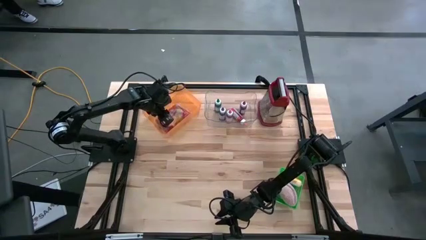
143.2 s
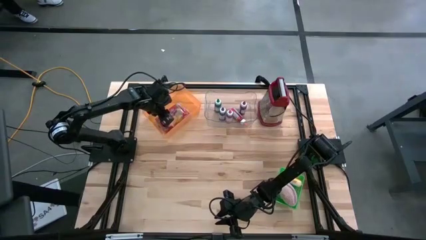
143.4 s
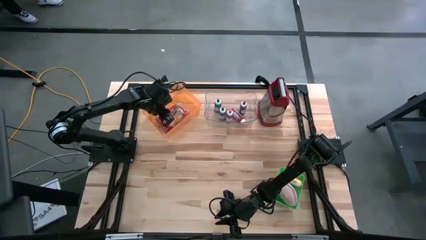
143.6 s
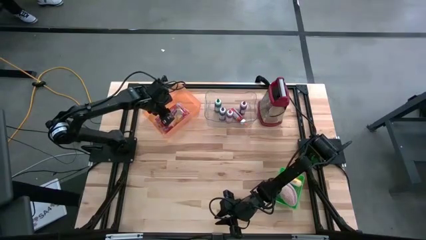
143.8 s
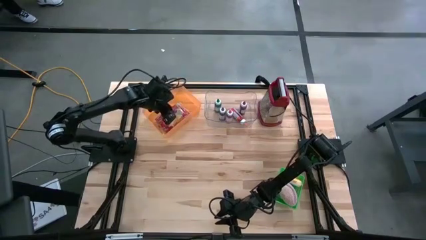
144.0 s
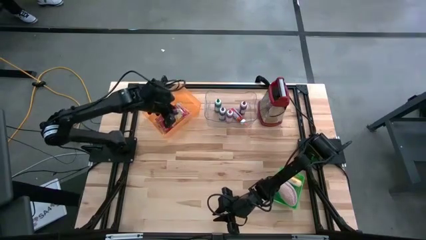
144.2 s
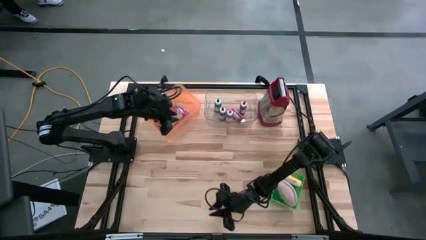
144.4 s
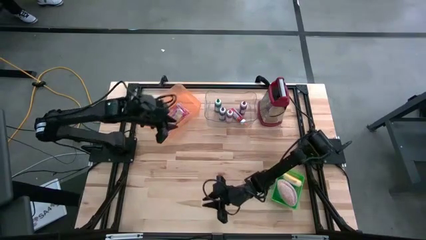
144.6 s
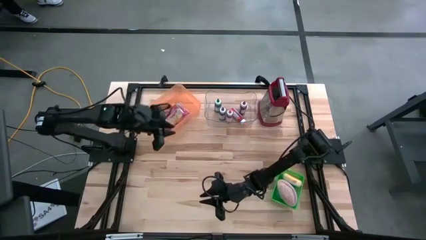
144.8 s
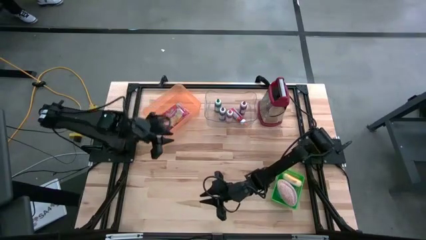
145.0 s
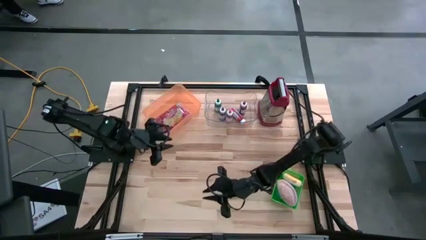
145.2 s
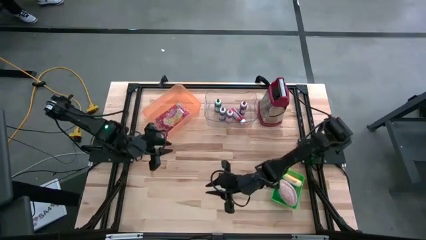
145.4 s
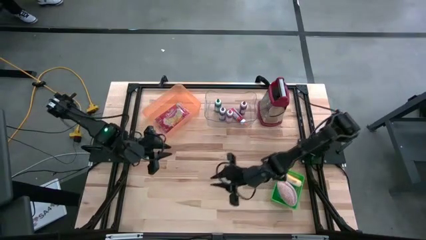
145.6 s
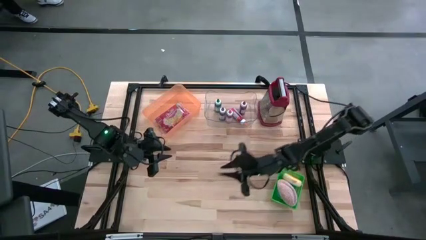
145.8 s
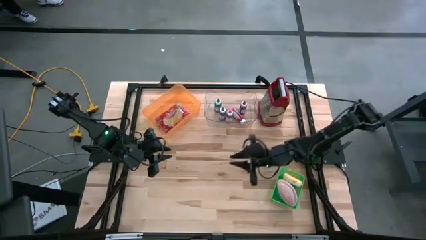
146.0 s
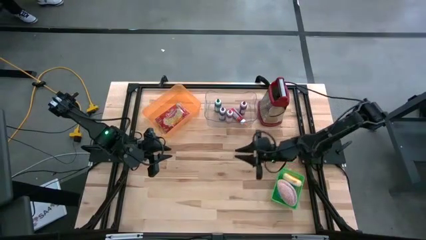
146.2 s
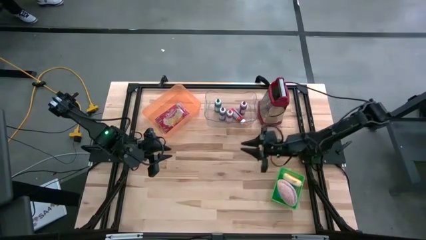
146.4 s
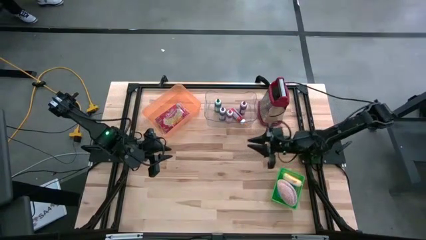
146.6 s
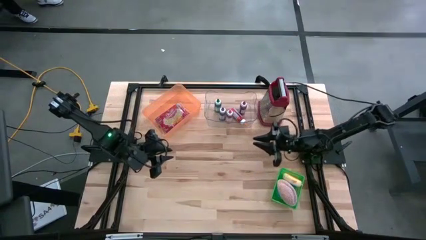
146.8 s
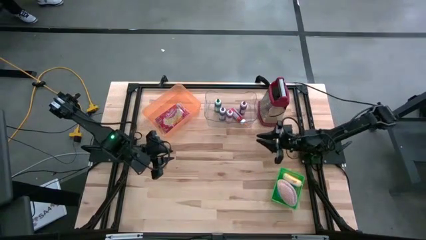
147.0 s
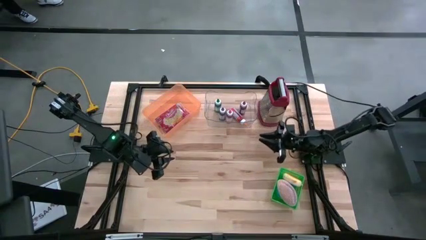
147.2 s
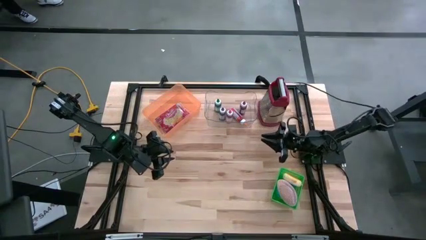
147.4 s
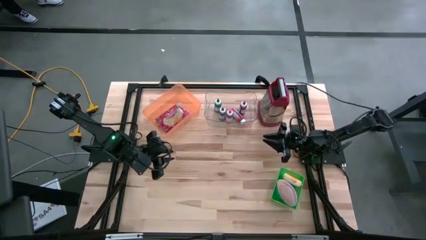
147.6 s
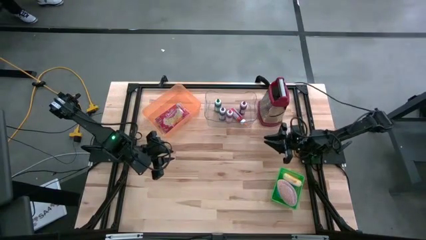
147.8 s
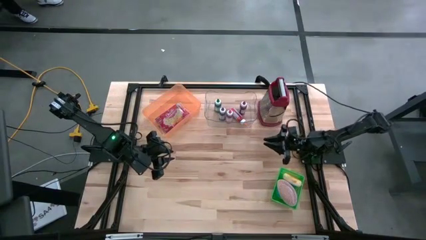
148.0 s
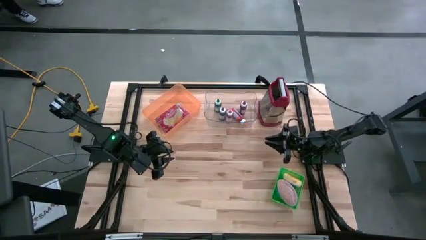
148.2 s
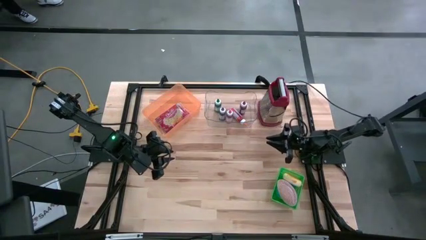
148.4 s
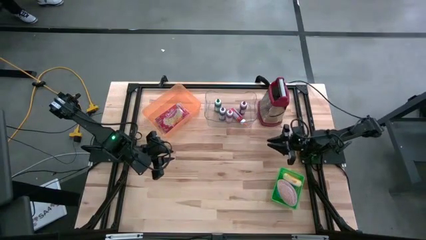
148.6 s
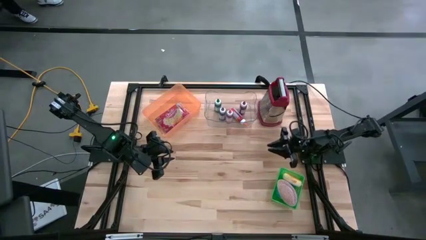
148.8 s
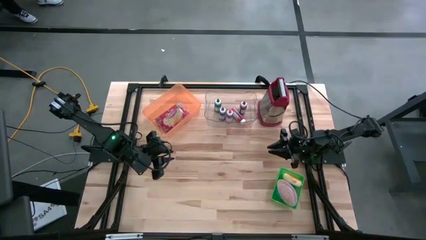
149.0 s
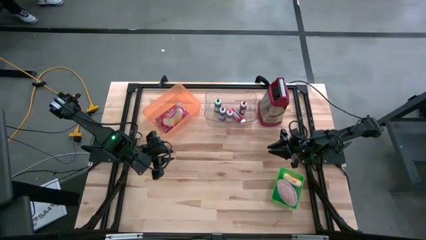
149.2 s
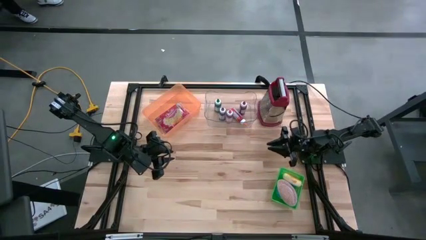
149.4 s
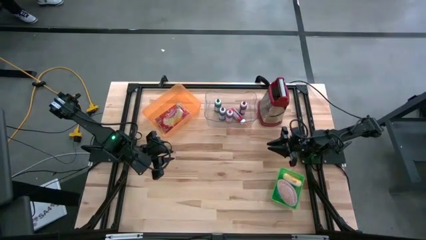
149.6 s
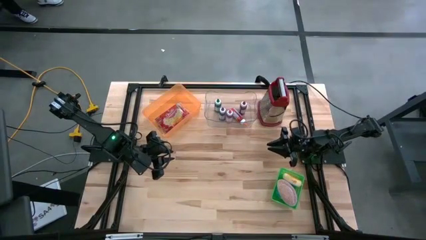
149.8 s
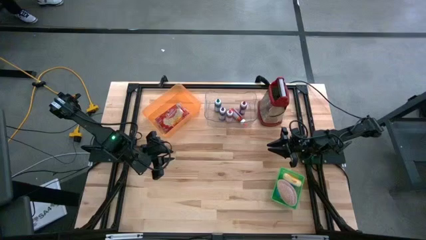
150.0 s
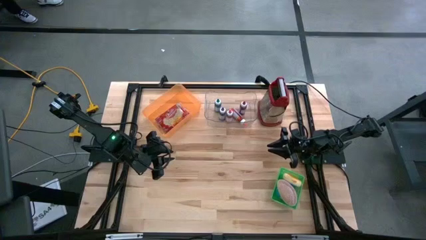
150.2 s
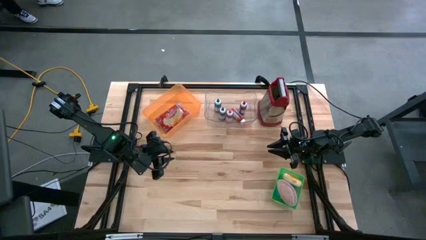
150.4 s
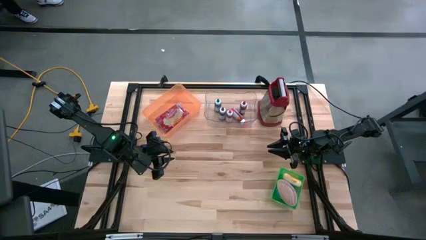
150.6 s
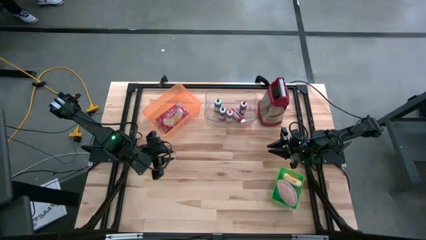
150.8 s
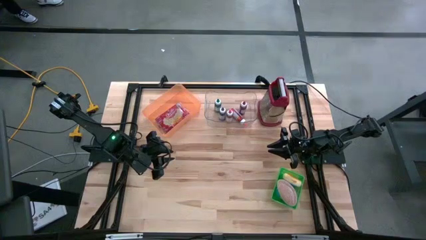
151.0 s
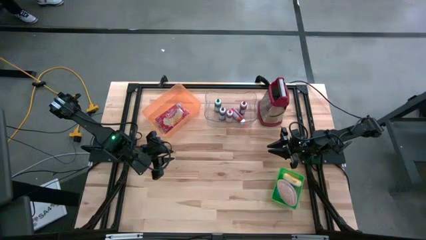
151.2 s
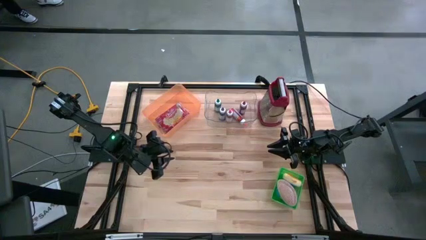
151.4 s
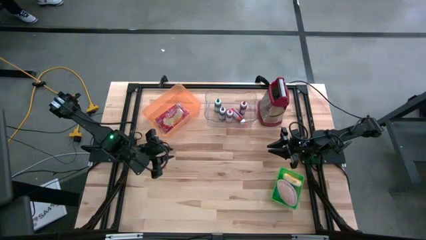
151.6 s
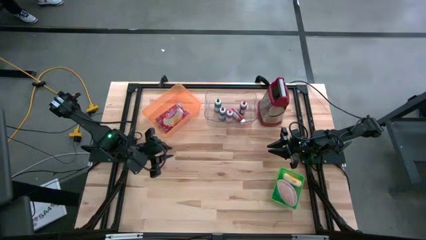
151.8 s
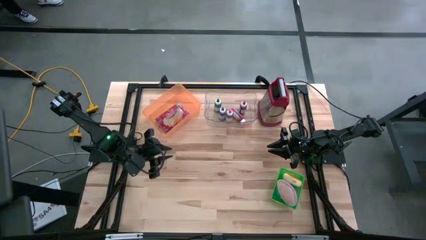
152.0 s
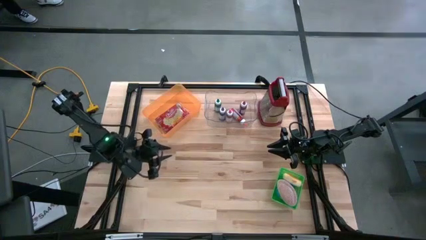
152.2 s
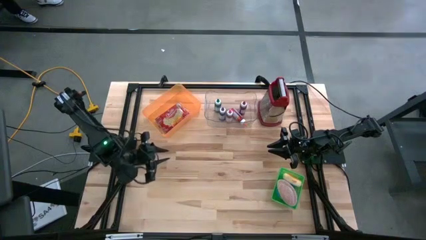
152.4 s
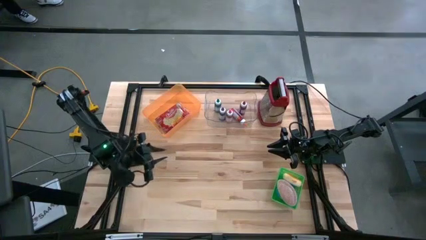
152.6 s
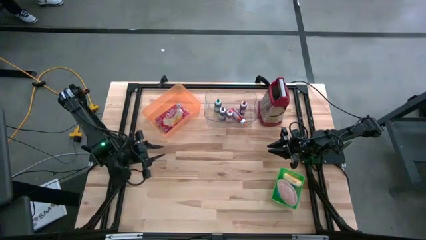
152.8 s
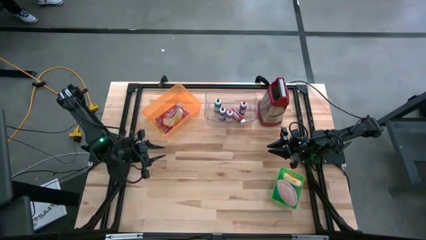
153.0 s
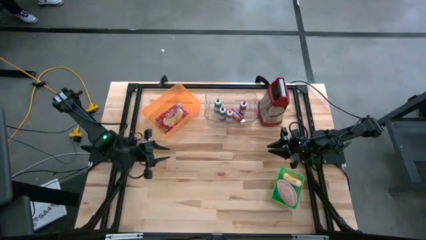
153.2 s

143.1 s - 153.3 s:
Return to Home Position
